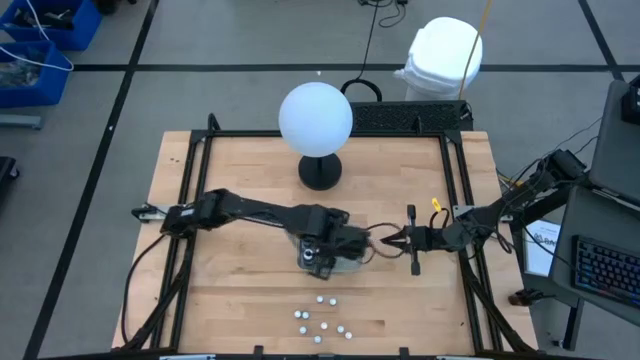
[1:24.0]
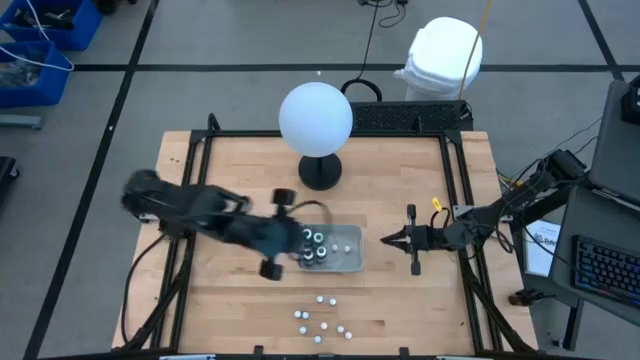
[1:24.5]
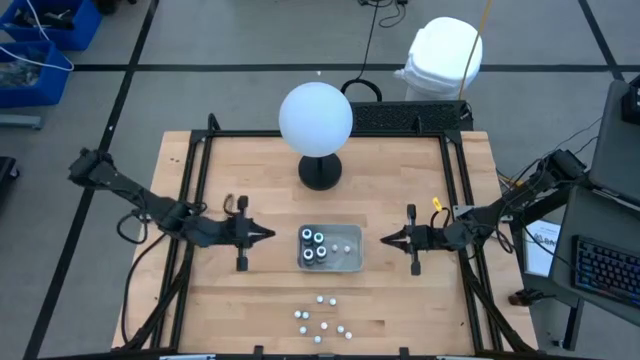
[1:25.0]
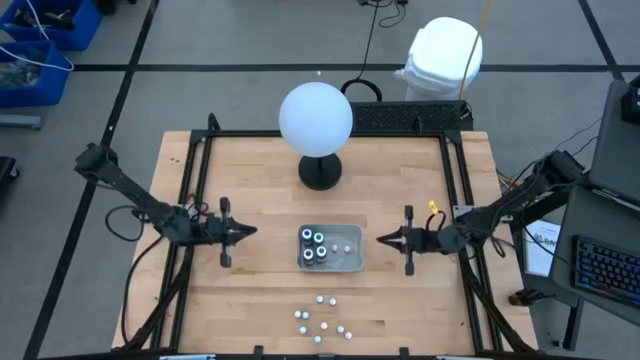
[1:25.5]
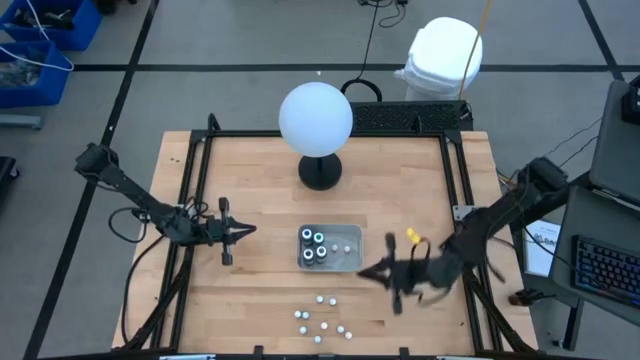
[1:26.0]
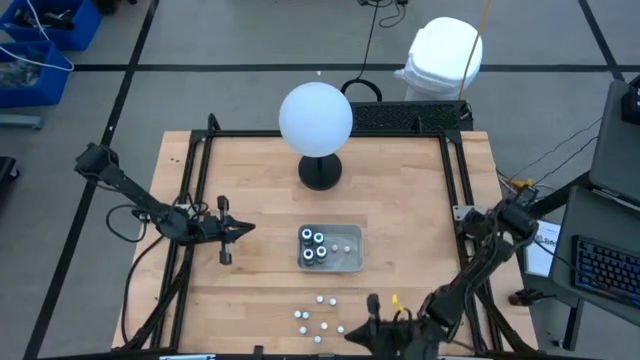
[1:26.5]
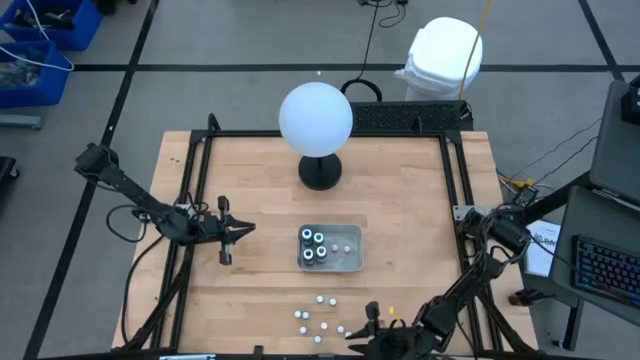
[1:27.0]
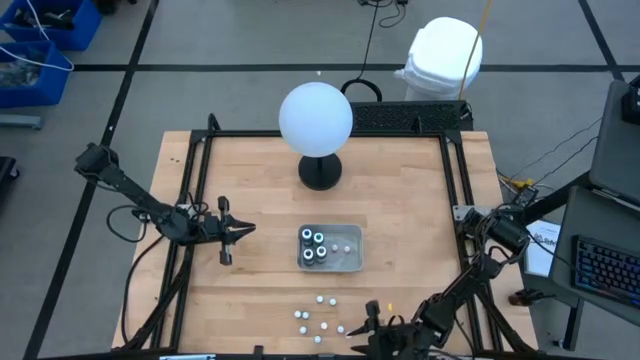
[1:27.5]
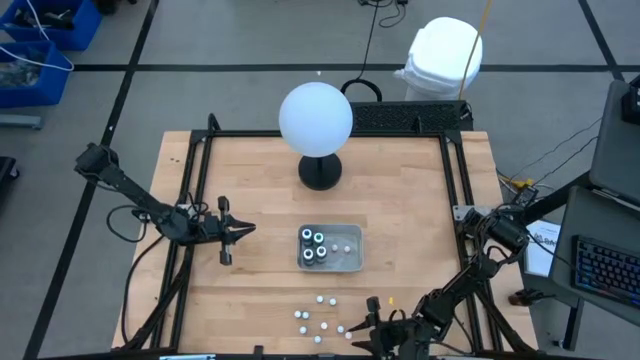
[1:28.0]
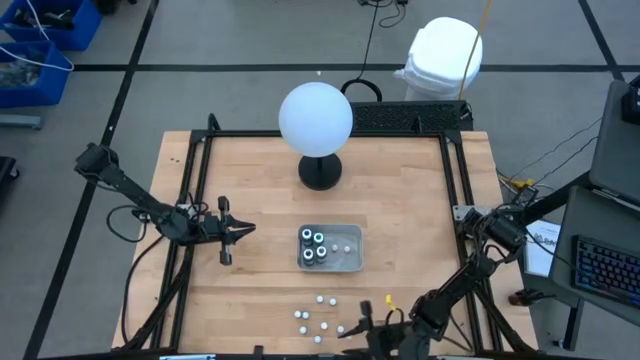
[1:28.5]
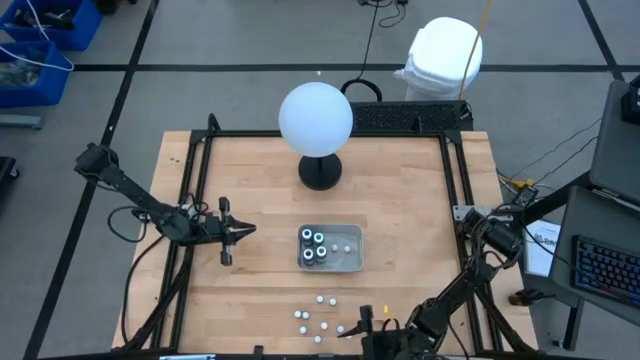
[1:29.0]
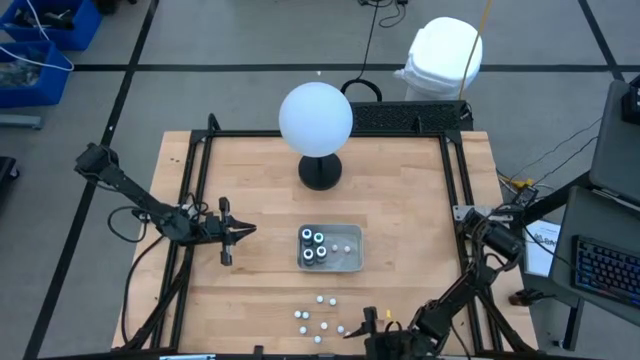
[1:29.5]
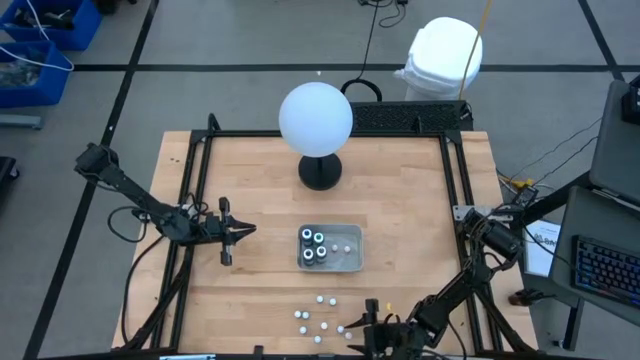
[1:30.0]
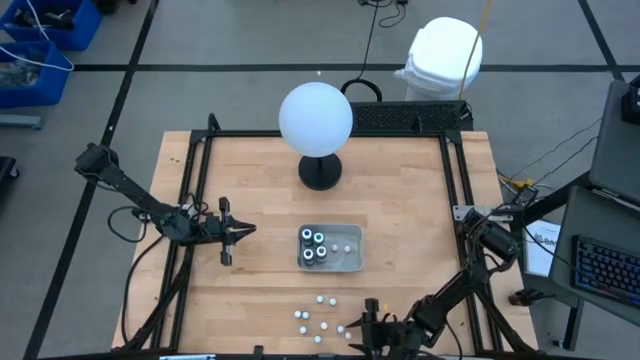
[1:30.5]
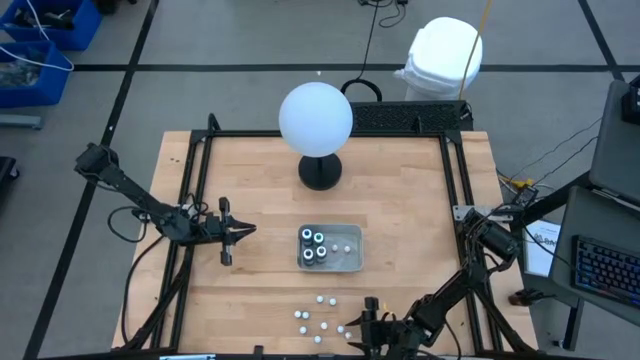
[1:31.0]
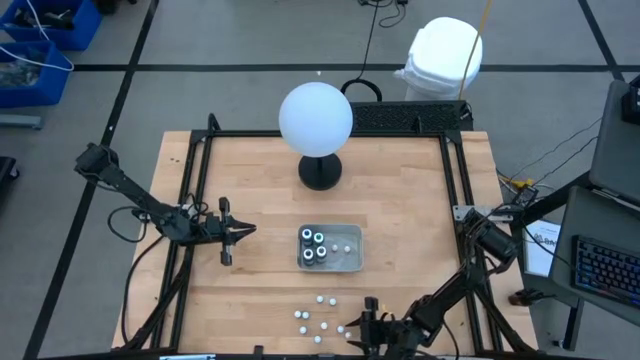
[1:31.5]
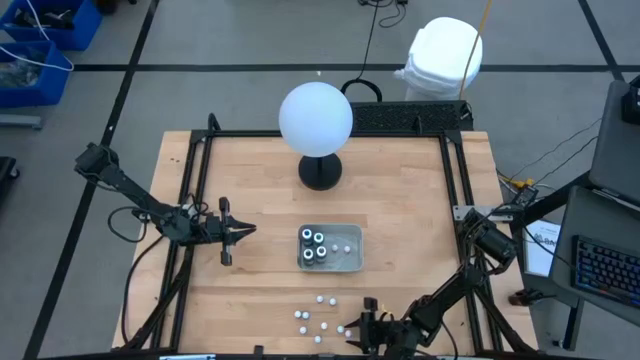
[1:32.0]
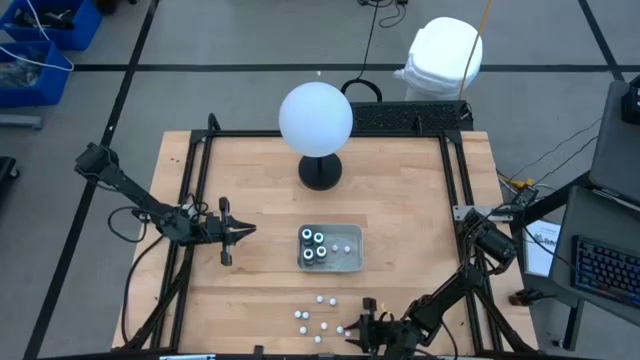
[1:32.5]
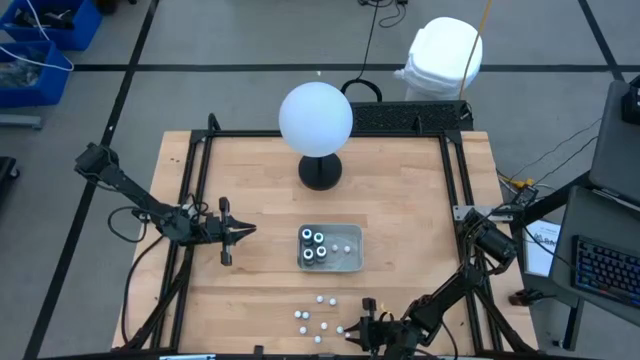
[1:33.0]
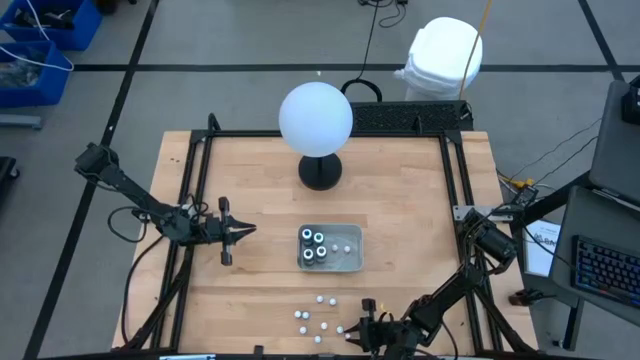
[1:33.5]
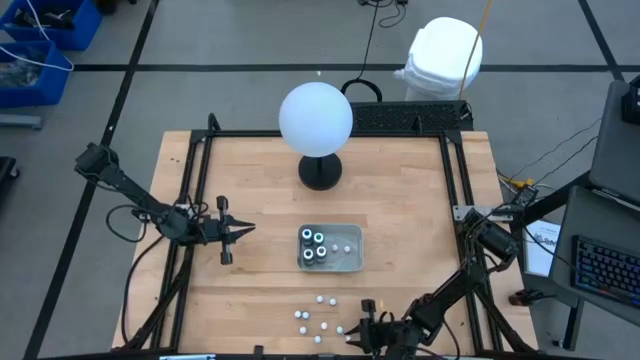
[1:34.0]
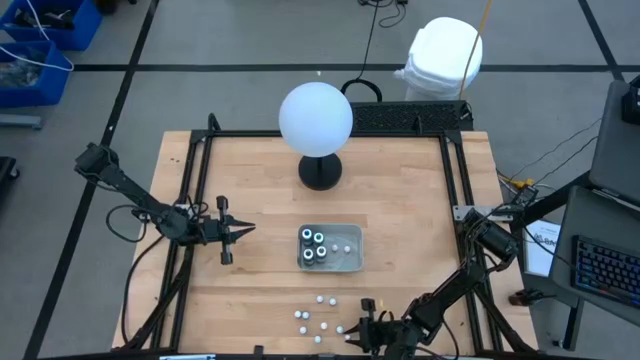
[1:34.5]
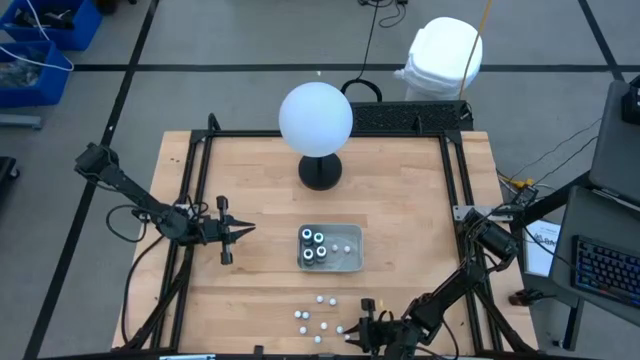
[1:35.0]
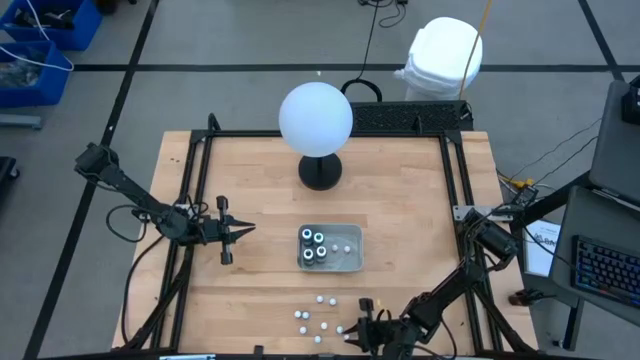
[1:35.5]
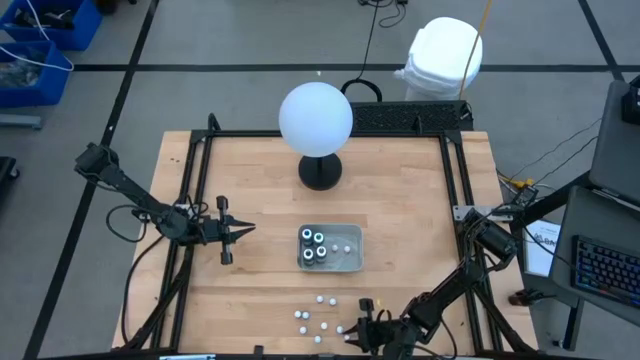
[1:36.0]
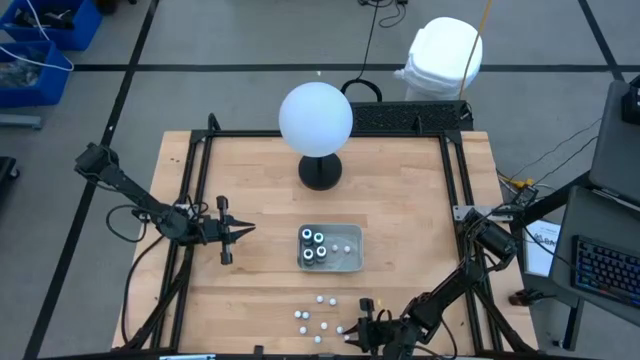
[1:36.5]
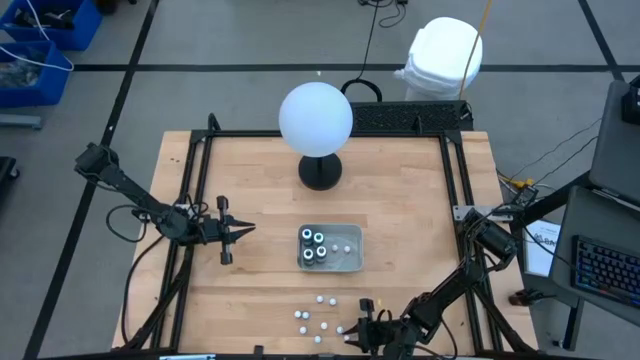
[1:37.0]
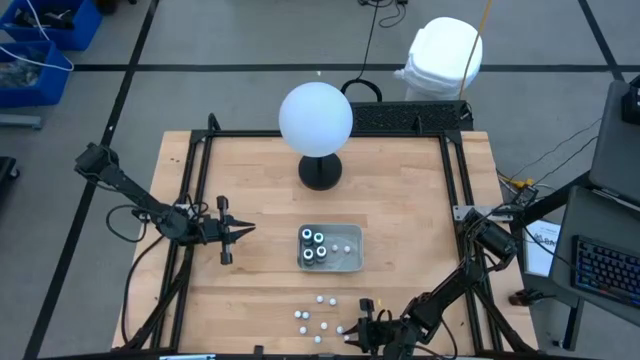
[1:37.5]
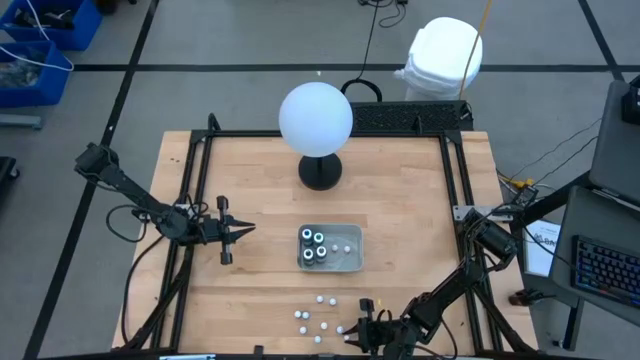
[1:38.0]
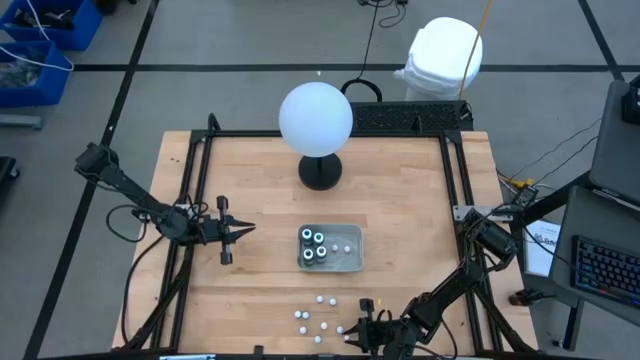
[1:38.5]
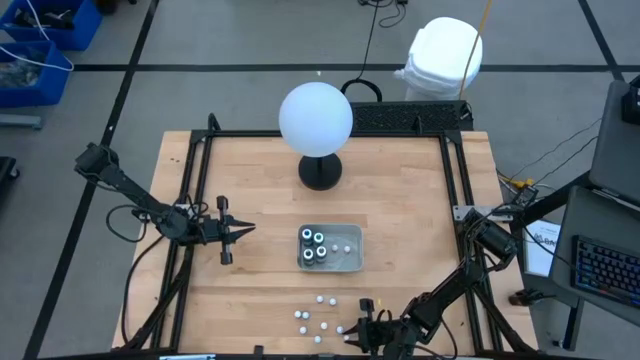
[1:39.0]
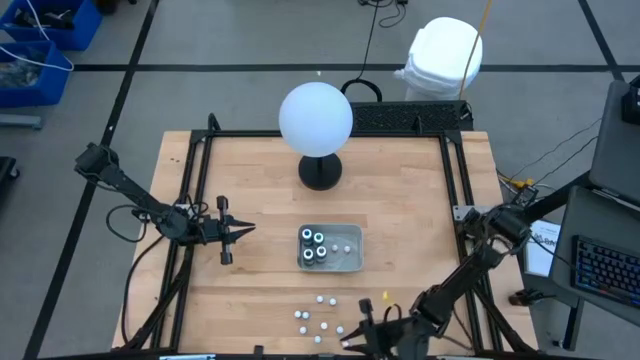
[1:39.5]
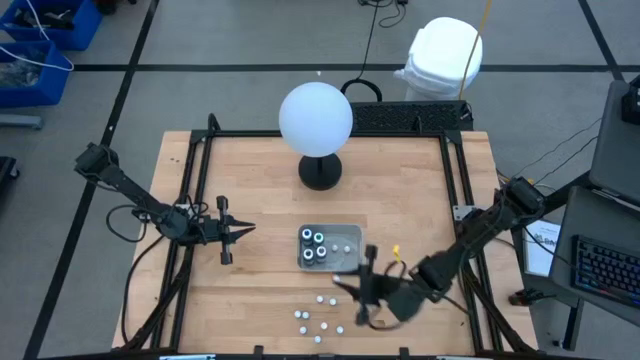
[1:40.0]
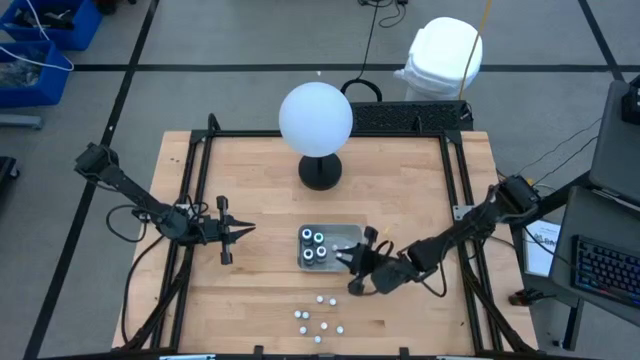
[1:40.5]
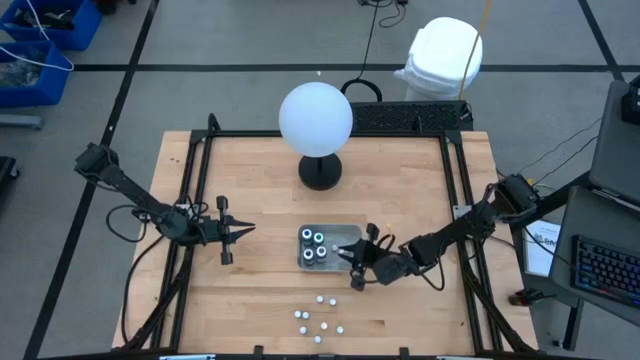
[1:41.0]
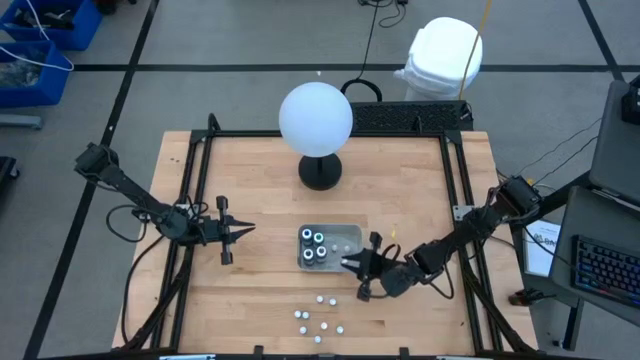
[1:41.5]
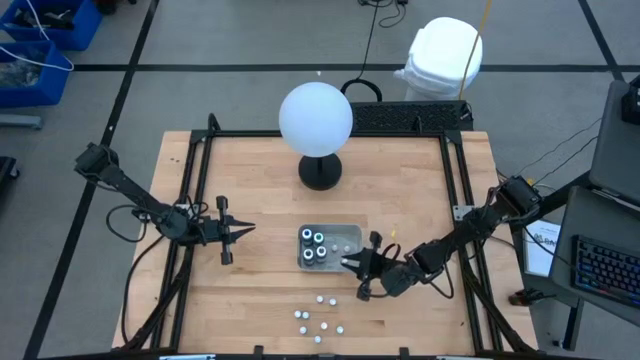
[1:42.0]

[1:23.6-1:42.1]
Task: Pick & Place food coloring
Put the small orange food coloring bottle into the gray bin
